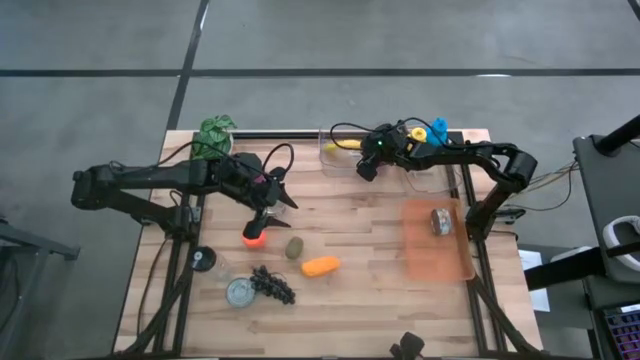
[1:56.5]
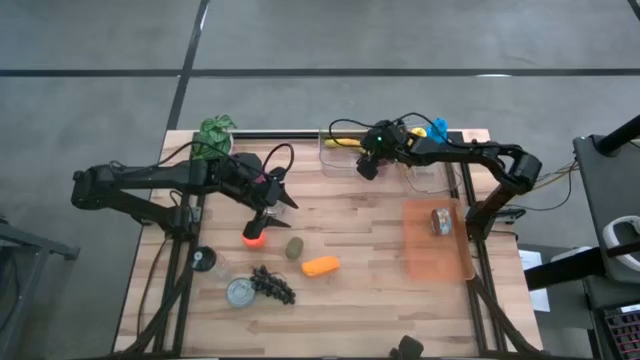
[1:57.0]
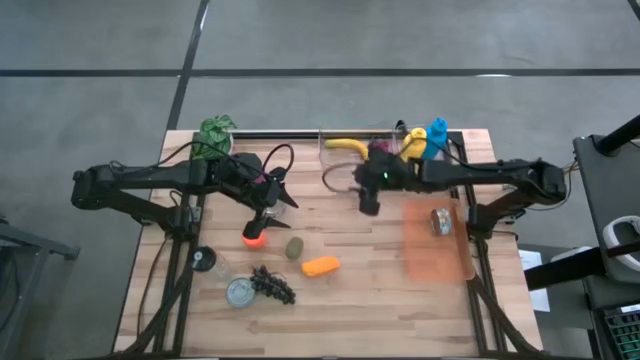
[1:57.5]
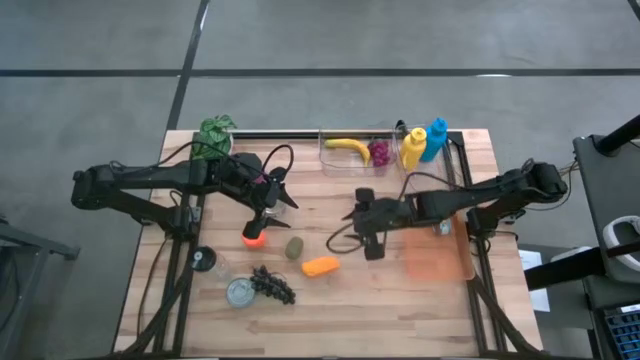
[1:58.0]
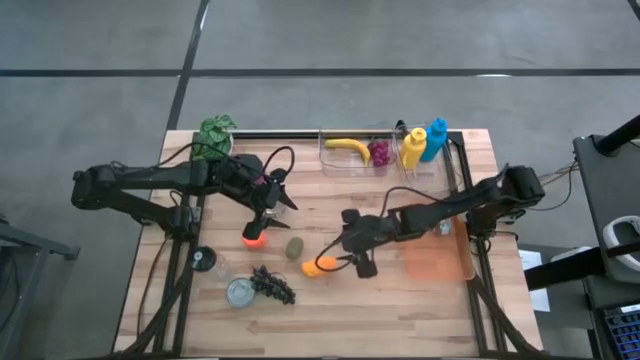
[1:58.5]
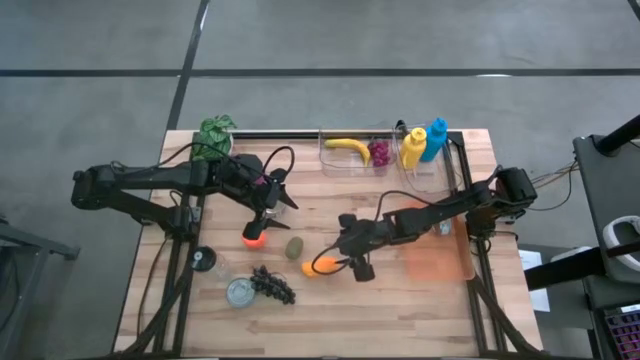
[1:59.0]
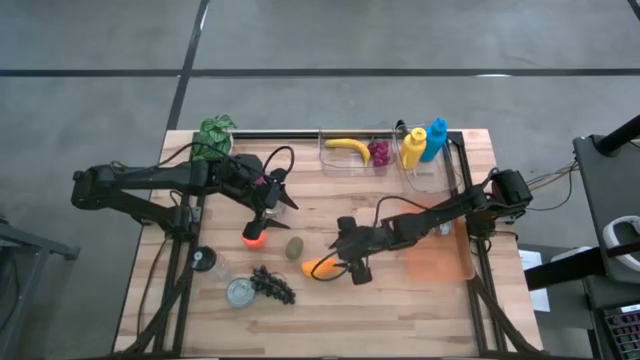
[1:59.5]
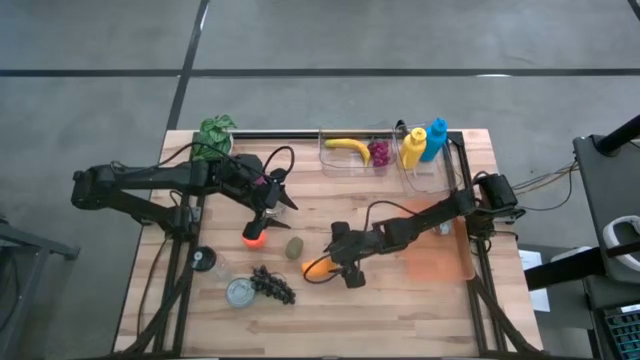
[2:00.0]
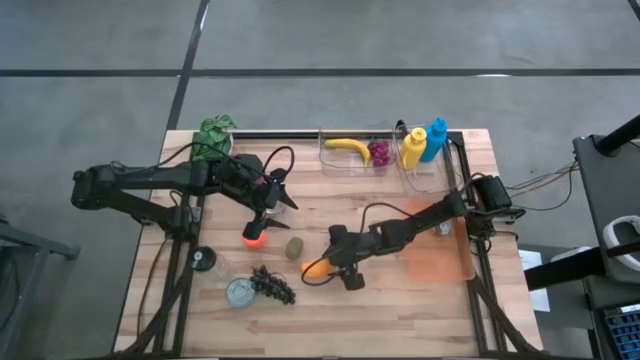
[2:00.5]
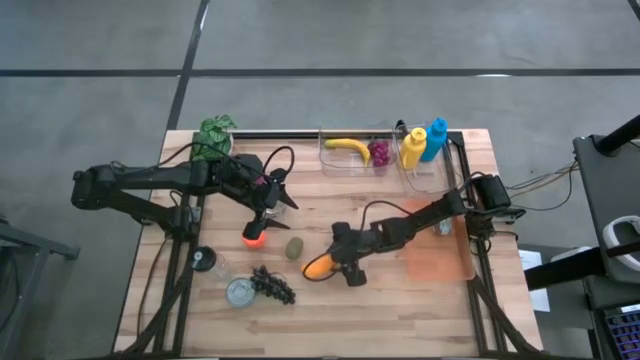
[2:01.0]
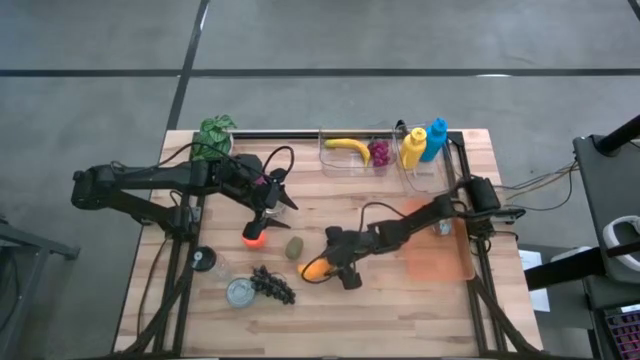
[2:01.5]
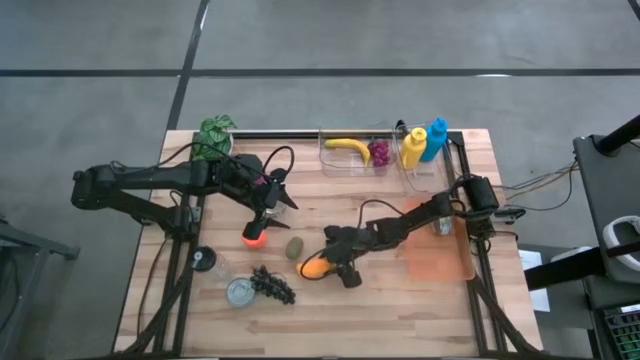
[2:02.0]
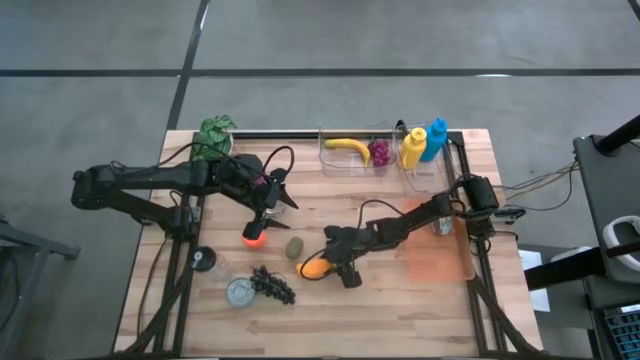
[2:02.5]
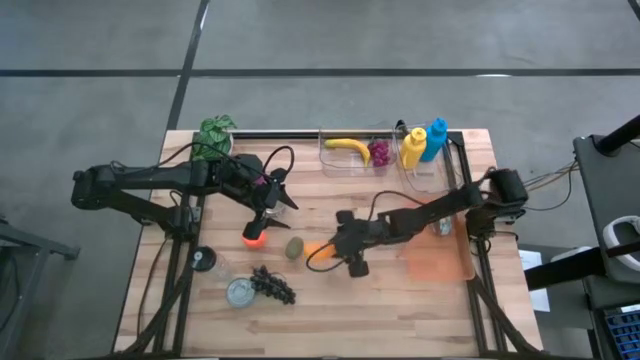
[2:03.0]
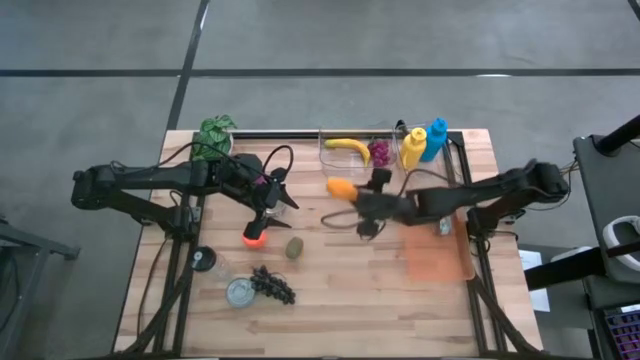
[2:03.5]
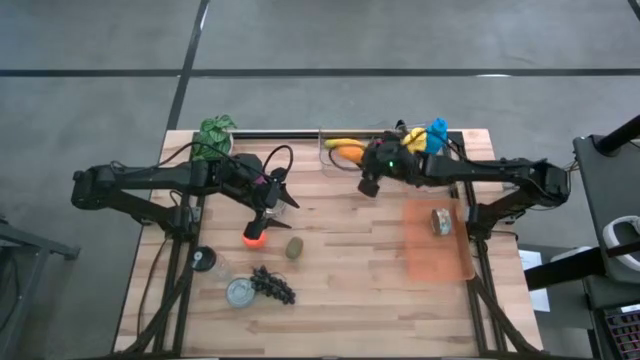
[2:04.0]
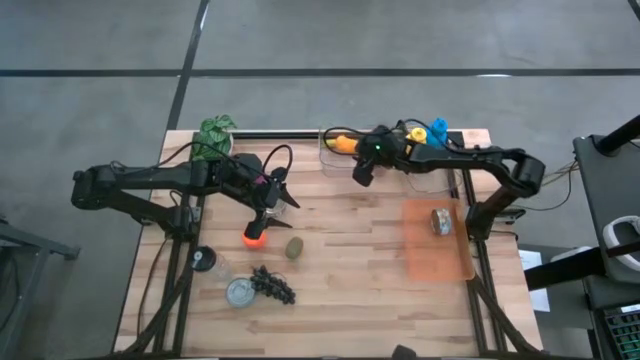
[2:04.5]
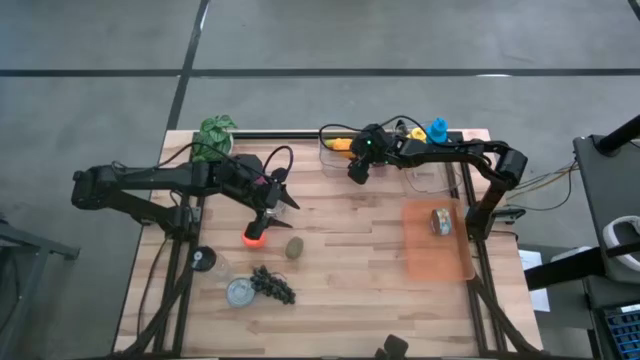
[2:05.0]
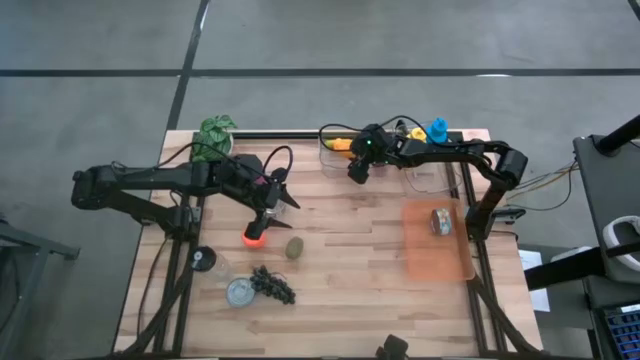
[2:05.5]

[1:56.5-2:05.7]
Task: Pick & Place Food Item
Put the yellow mango into the left transparent bin

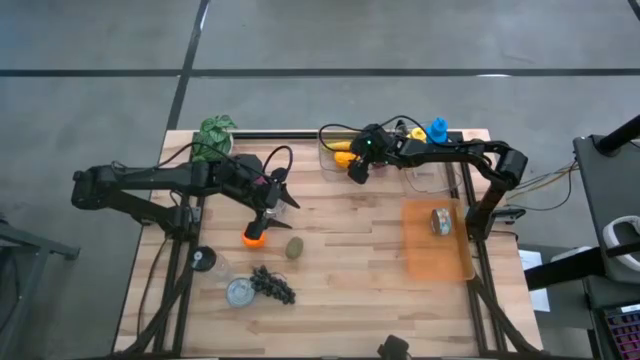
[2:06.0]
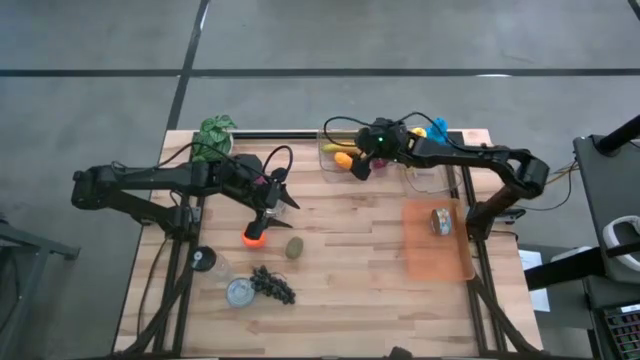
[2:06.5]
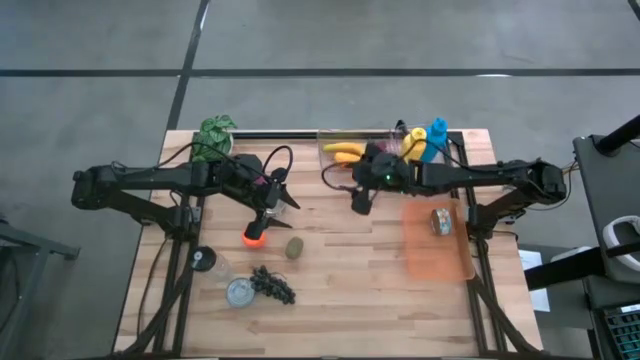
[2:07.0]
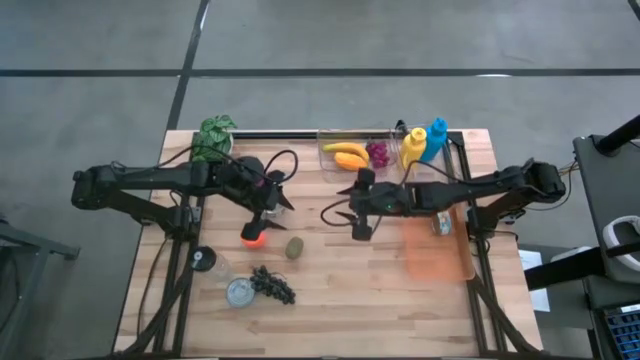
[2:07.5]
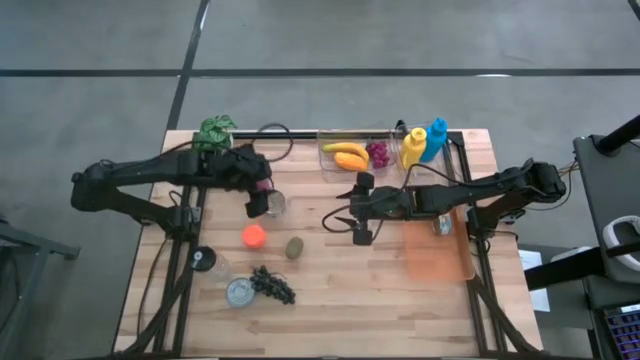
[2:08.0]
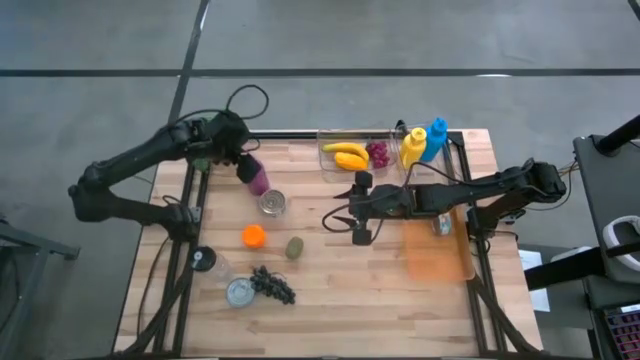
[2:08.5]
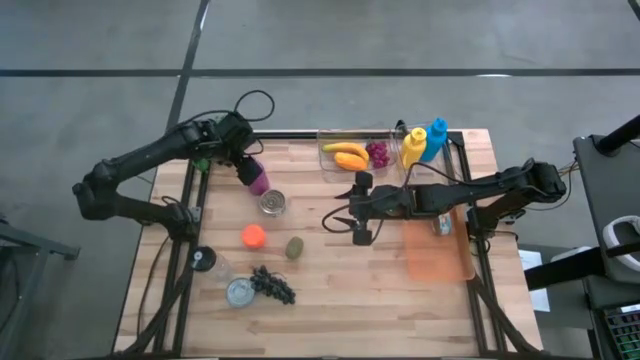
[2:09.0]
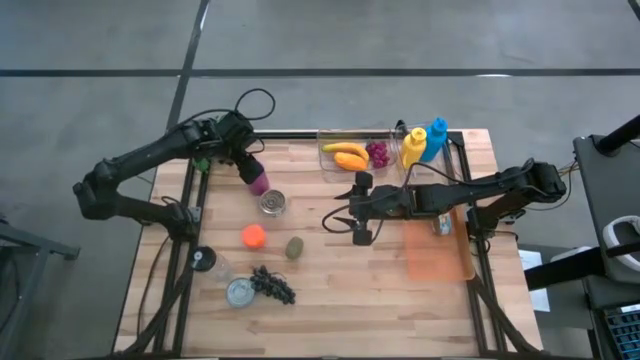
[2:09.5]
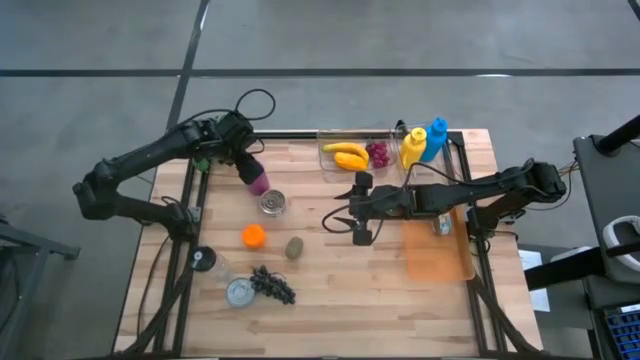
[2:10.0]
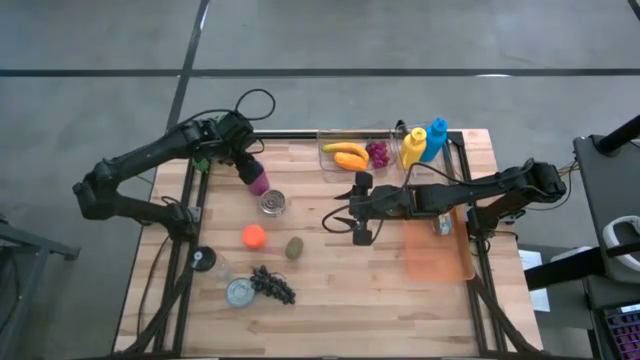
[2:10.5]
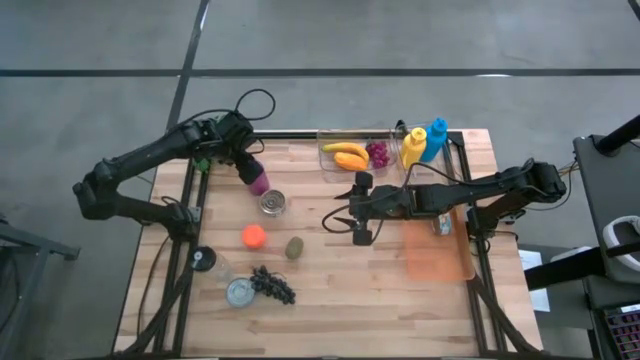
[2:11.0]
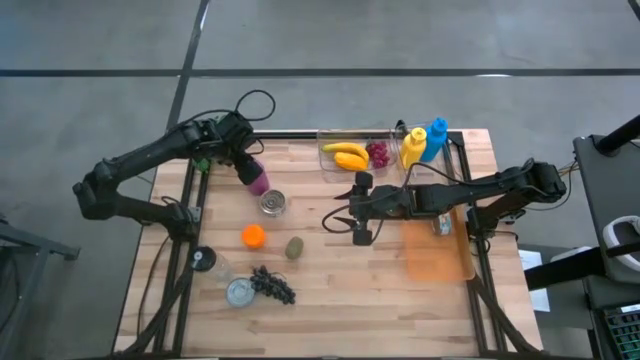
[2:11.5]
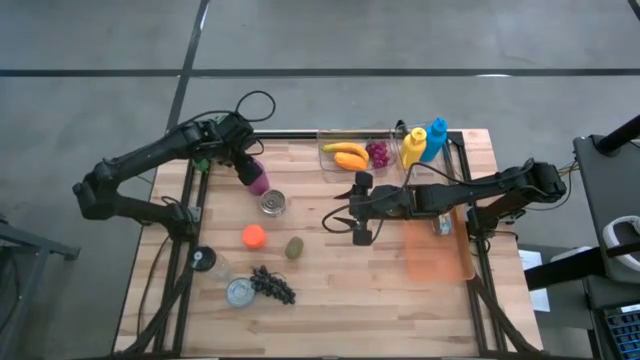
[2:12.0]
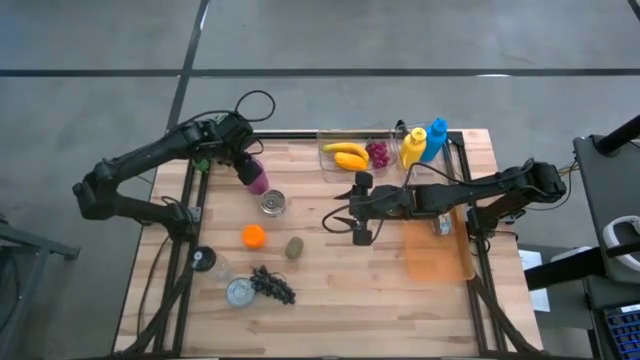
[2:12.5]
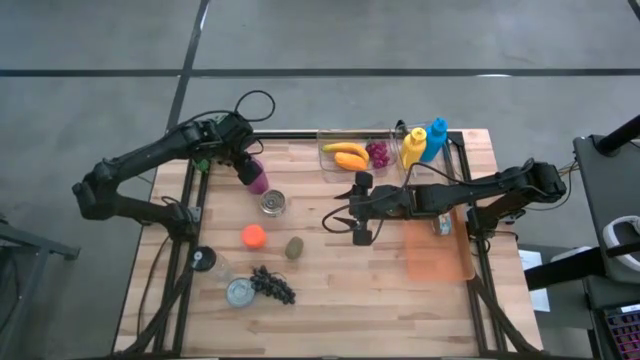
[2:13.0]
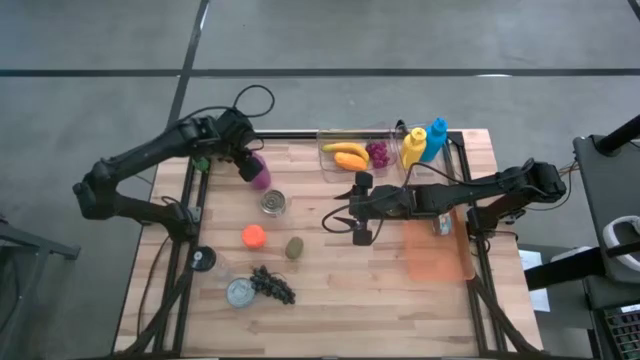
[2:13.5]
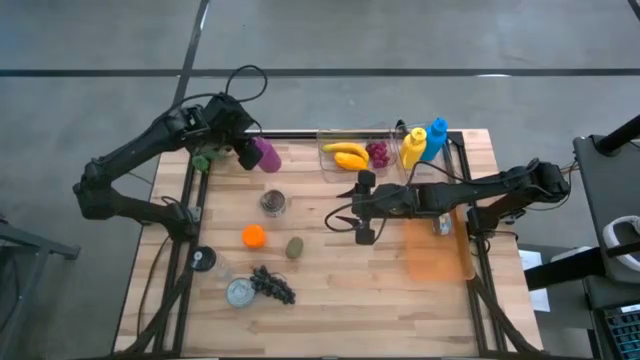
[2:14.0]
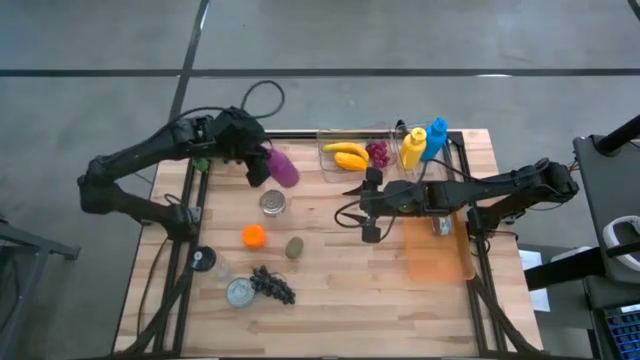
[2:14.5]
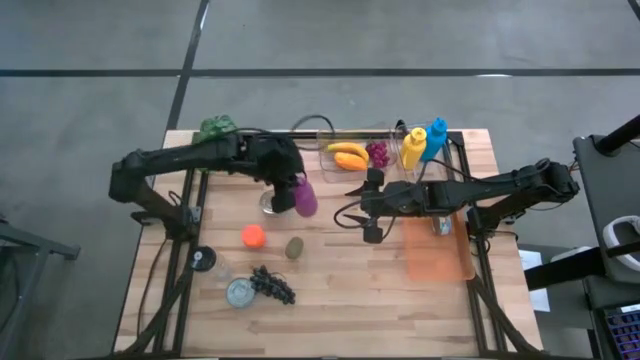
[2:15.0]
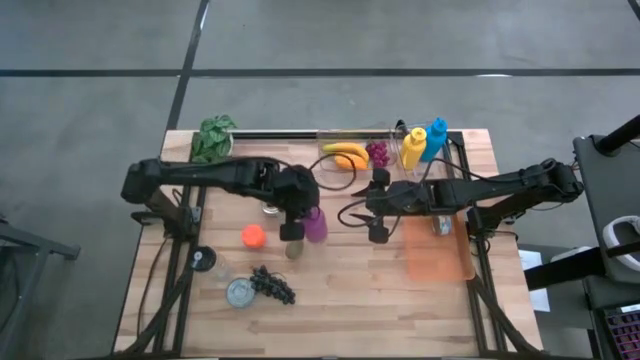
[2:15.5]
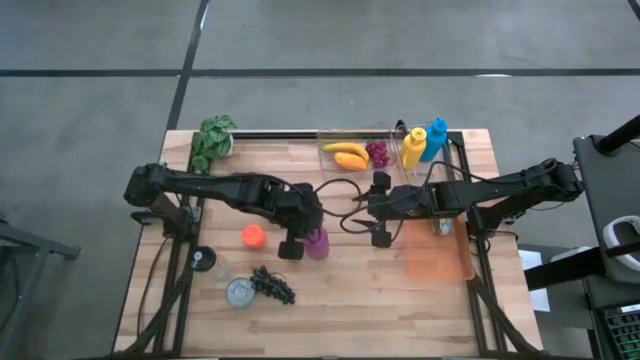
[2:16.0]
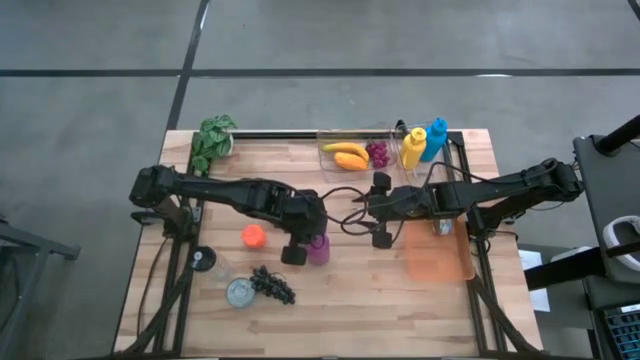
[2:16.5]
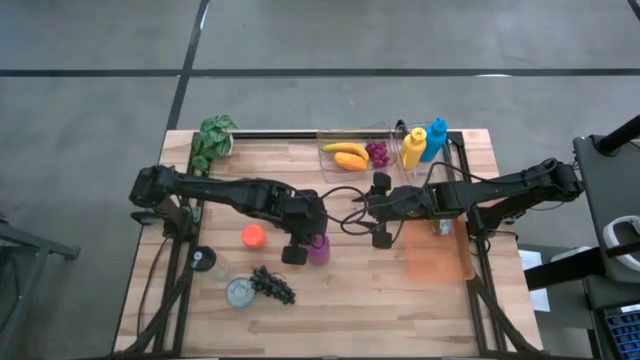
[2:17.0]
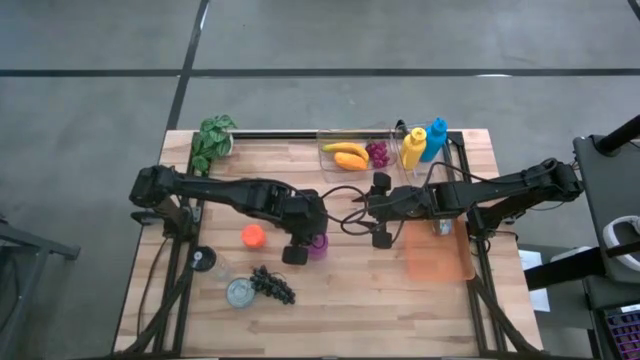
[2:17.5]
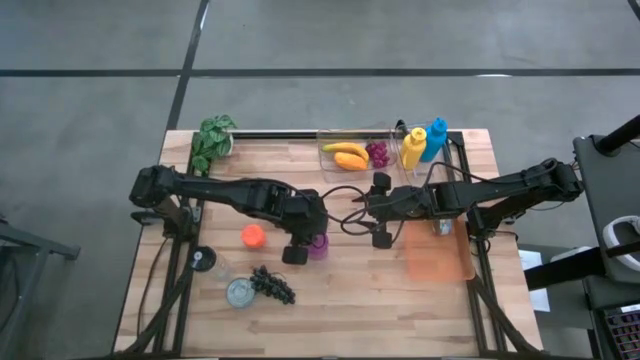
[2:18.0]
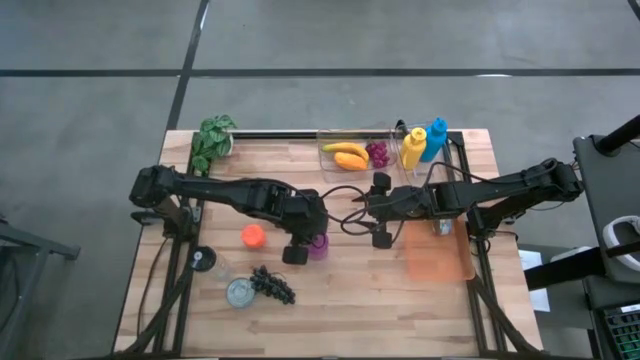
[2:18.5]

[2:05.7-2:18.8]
Put the violet water bottle into the right transparent bin
